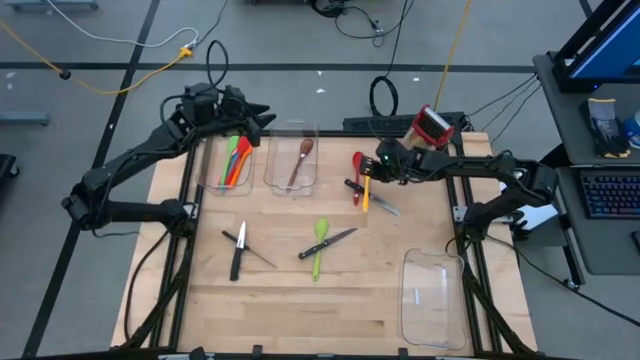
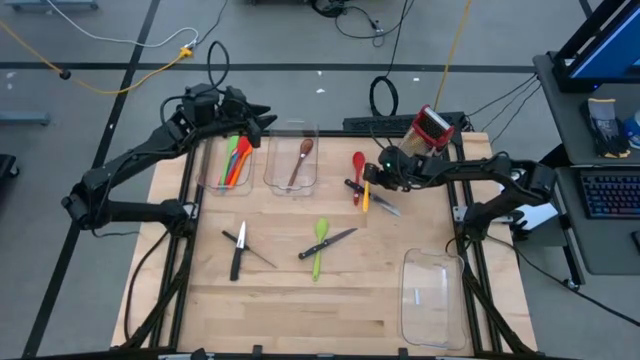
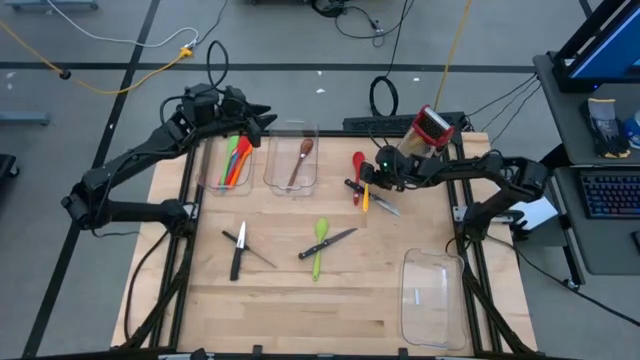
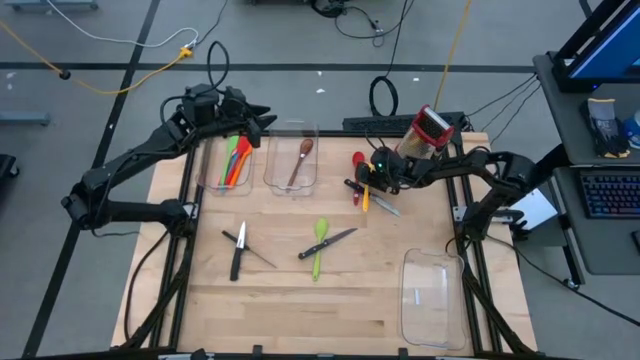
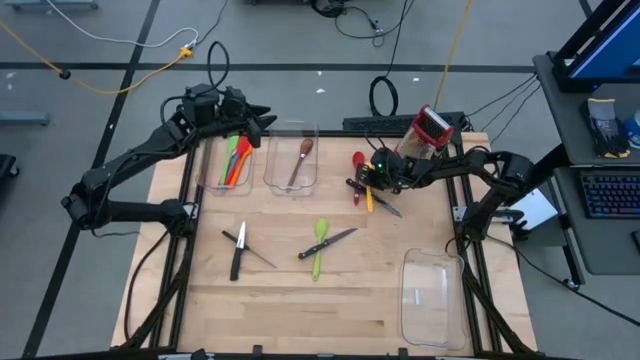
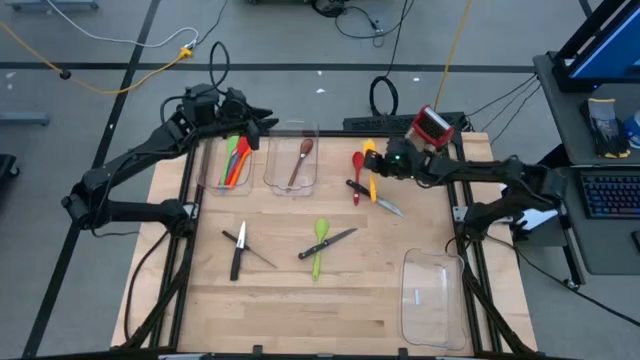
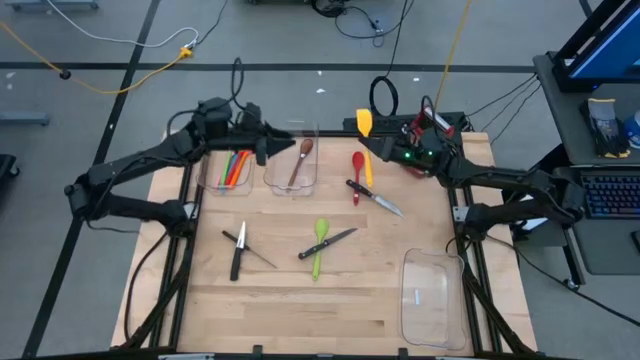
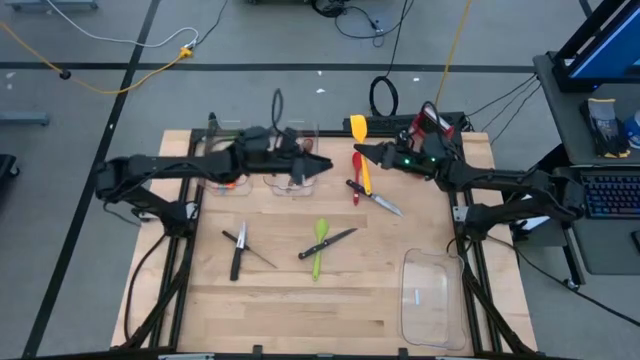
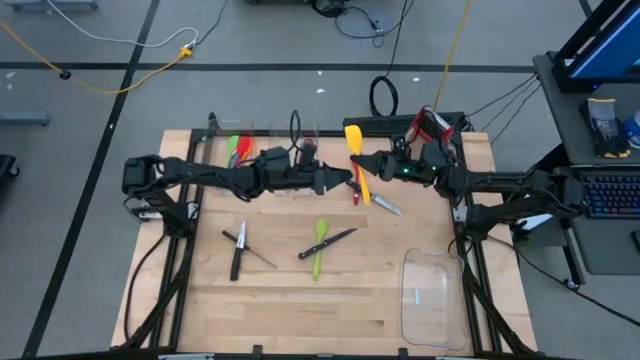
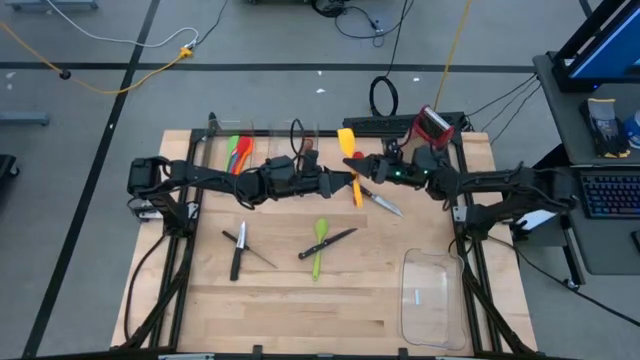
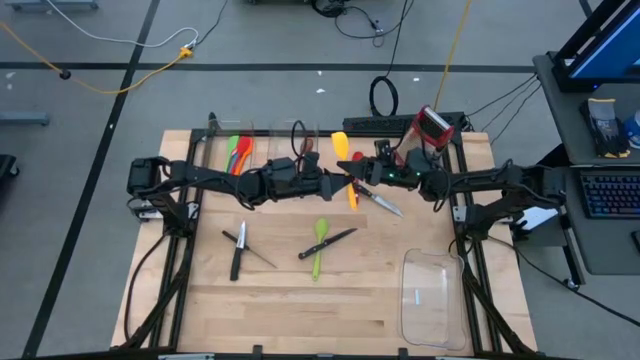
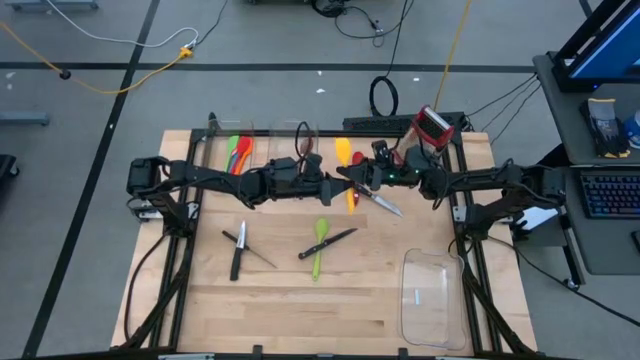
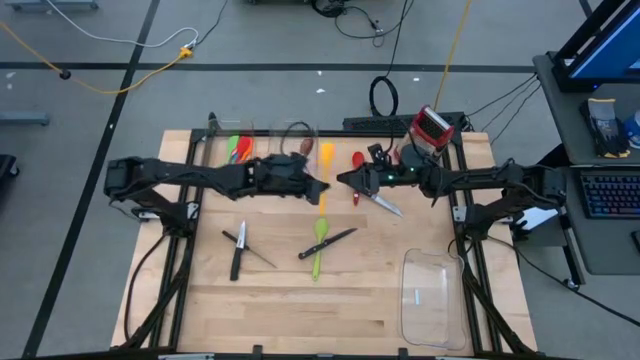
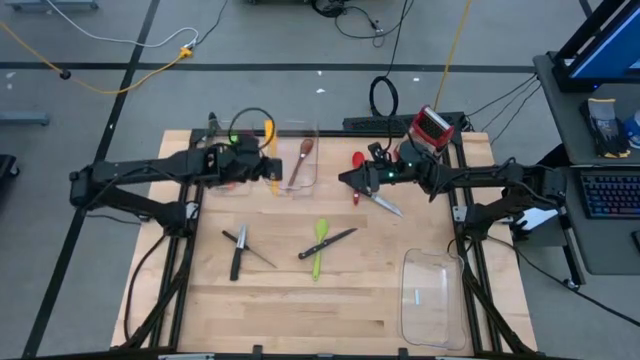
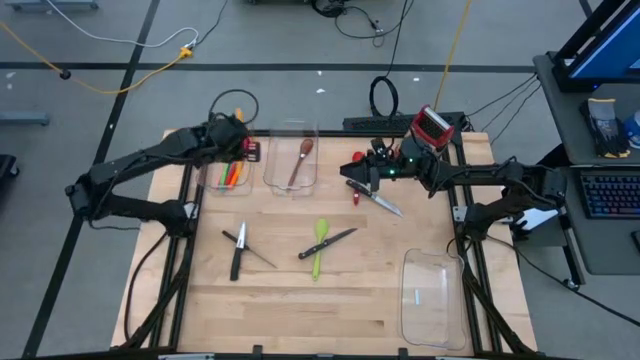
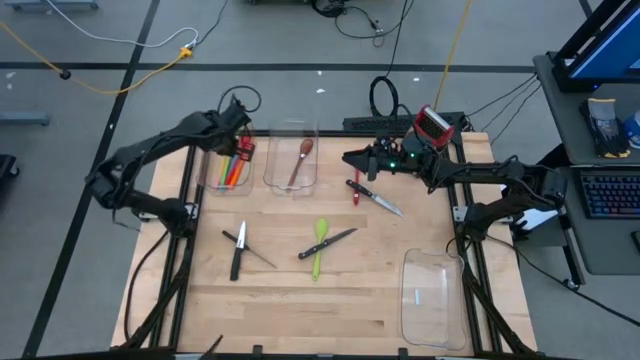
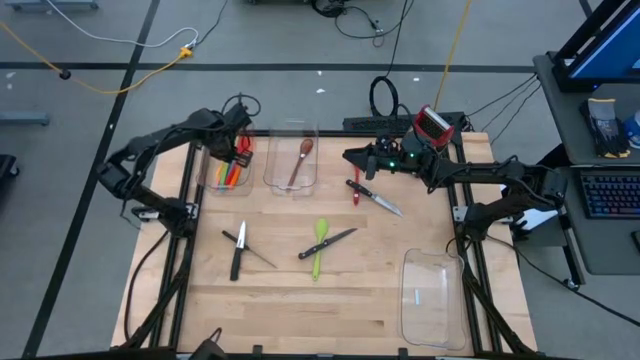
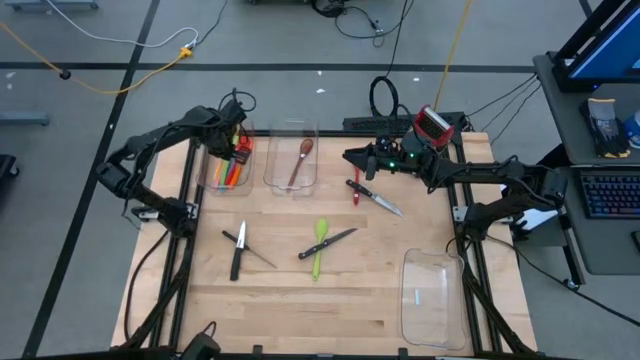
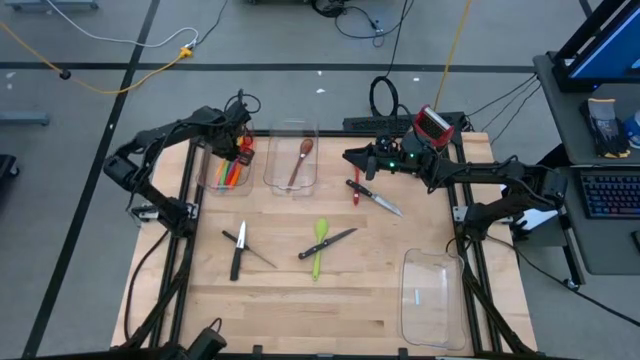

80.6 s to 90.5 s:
Task: Pick & Place Kitchen Items
Put the yellow spatula into the left trans parent bin

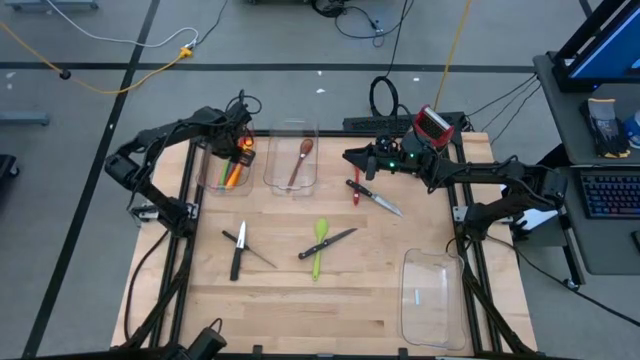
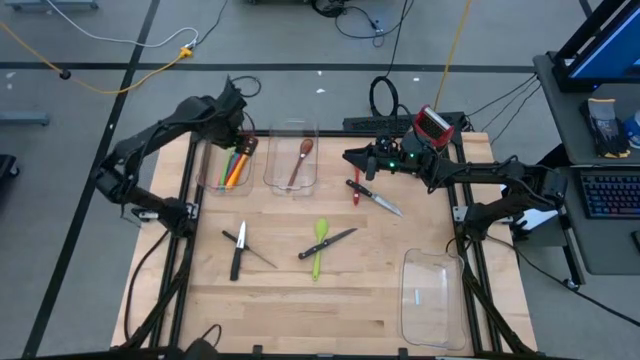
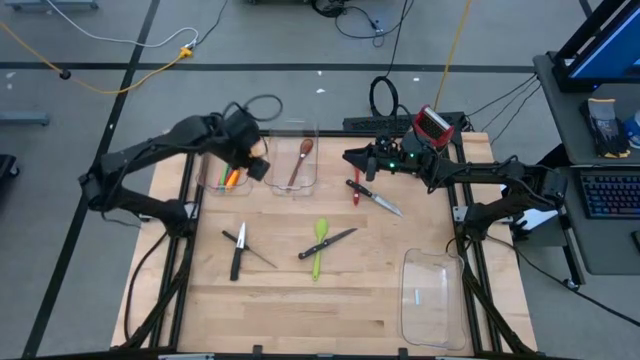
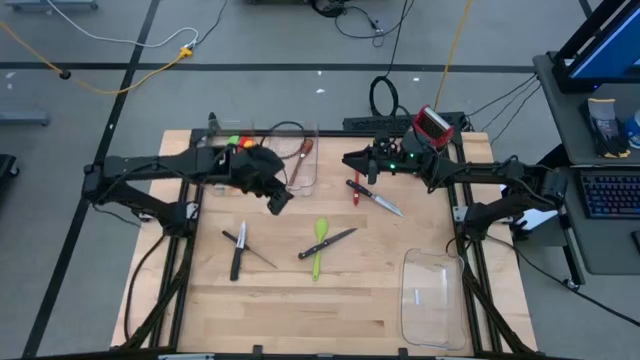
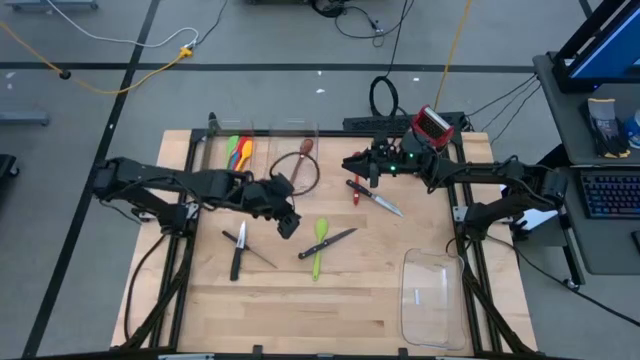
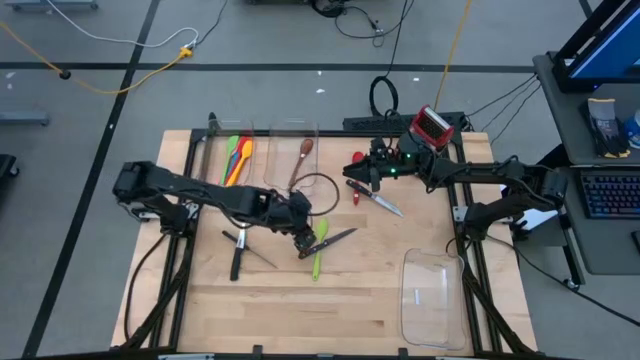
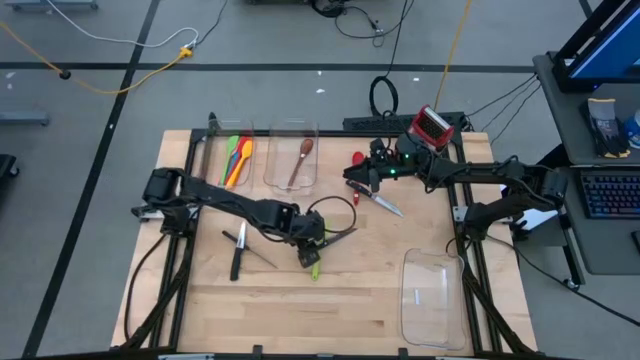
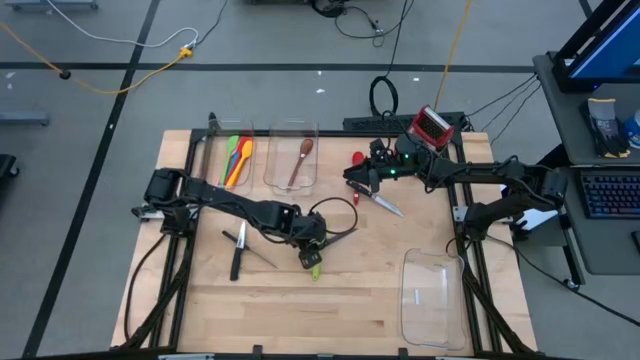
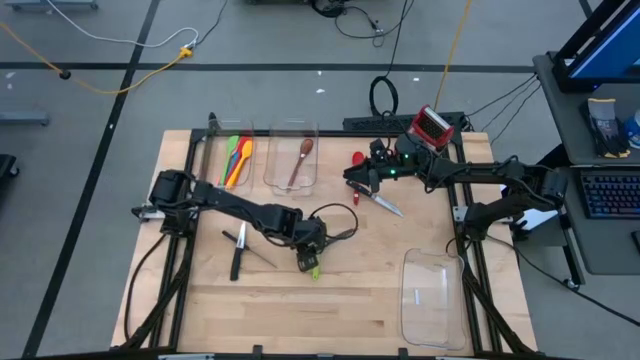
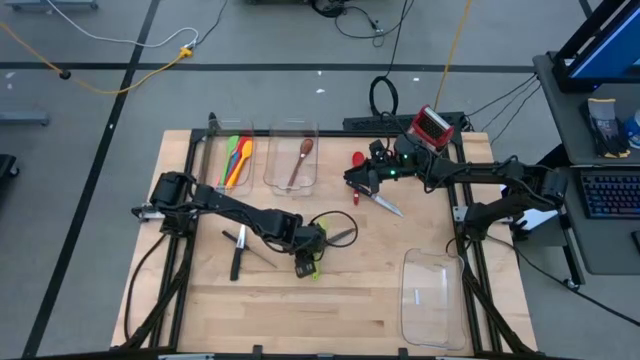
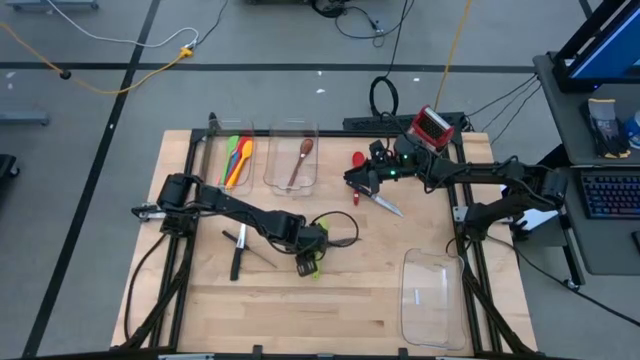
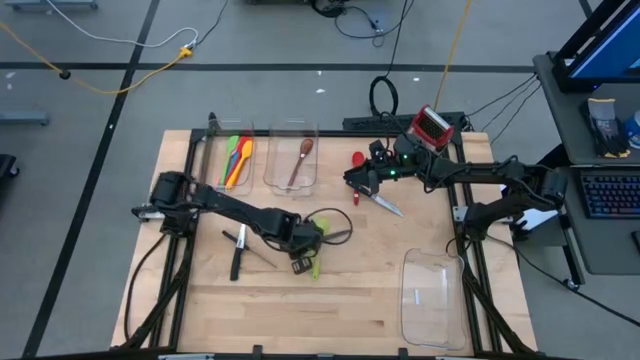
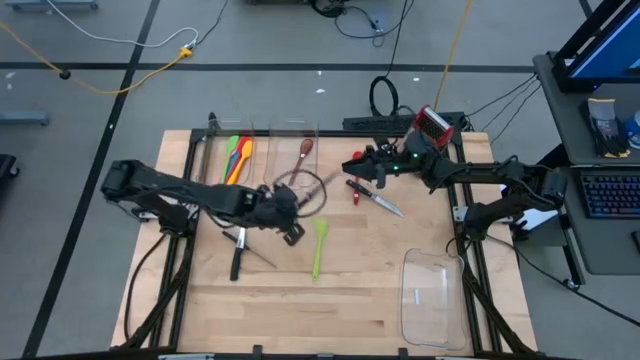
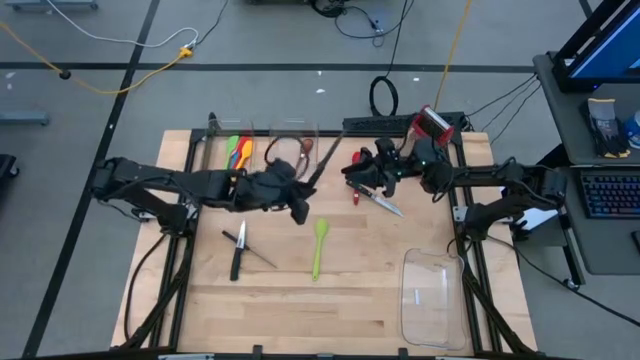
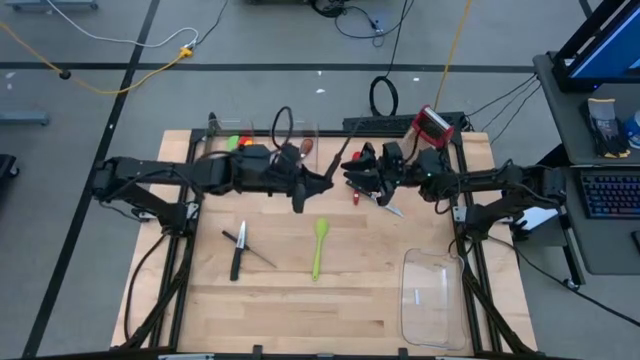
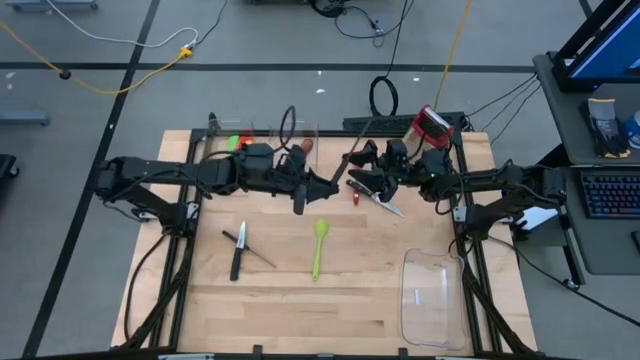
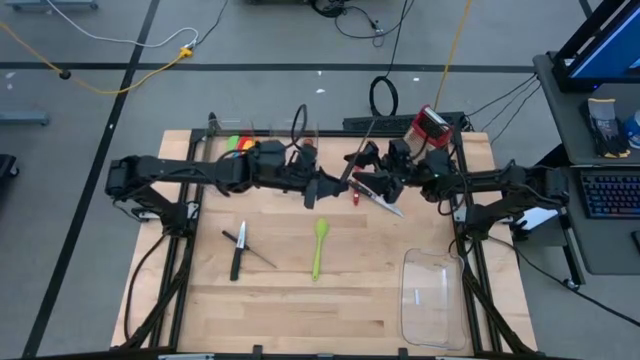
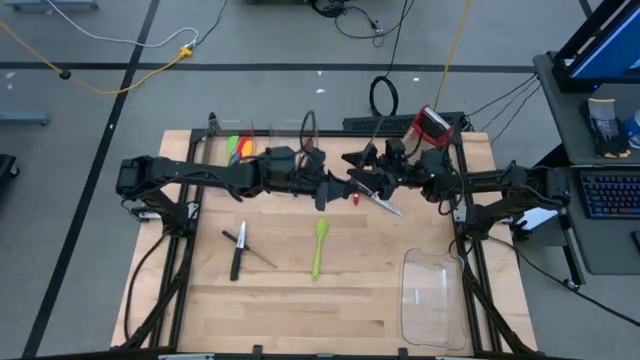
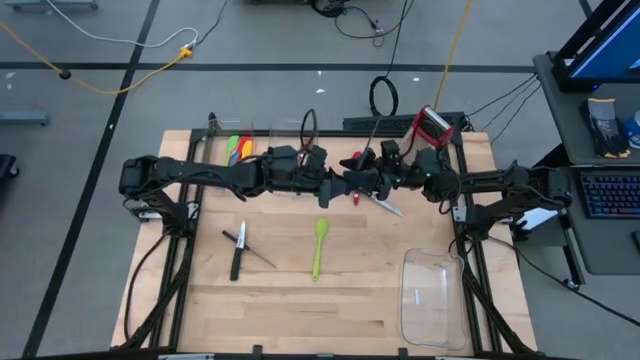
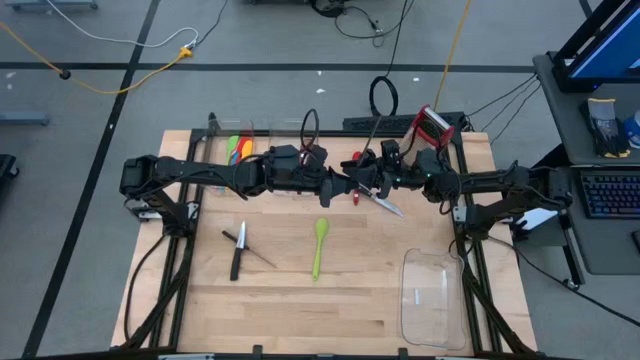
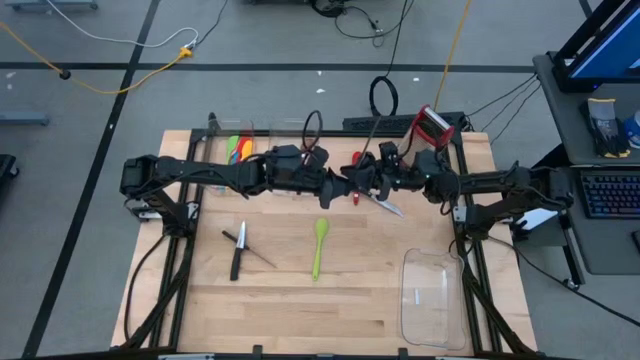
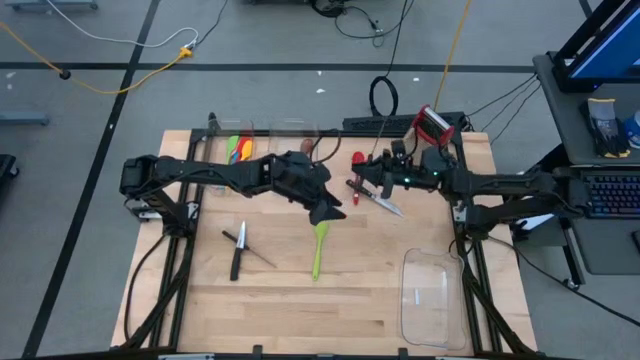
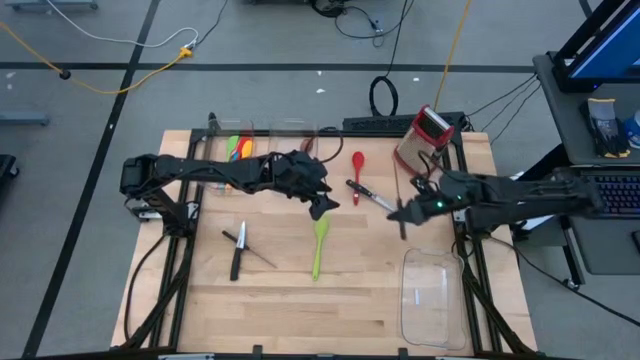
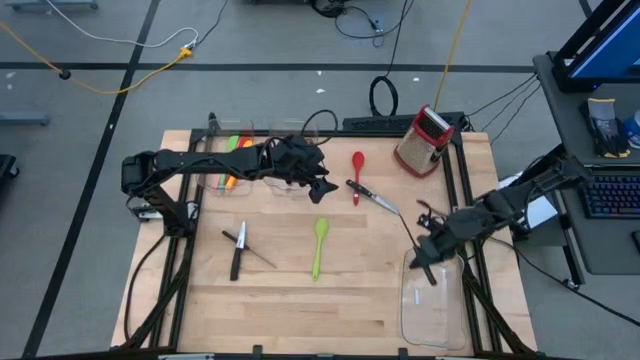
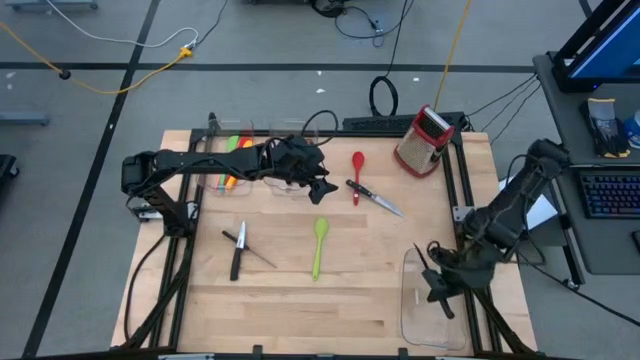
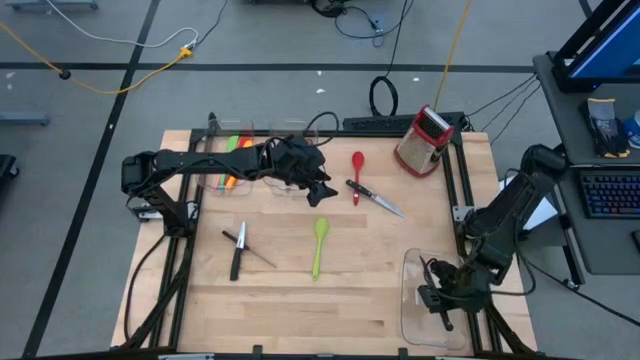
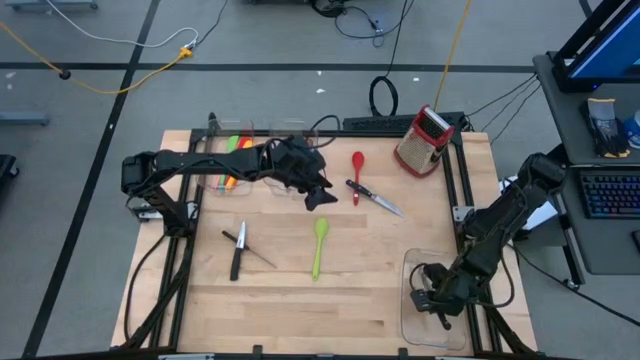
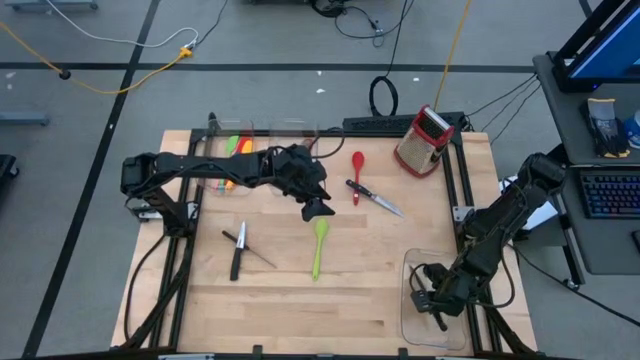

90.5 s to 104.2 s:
Put the knife into the bottom transparent bin
